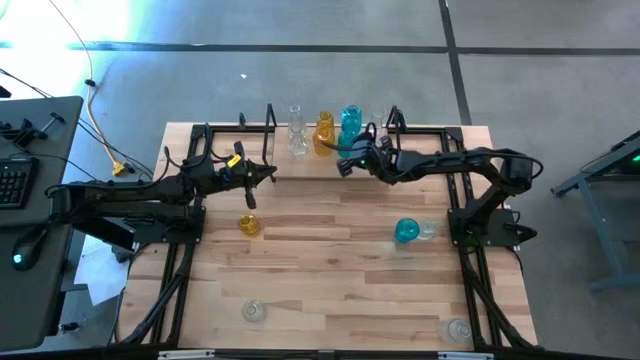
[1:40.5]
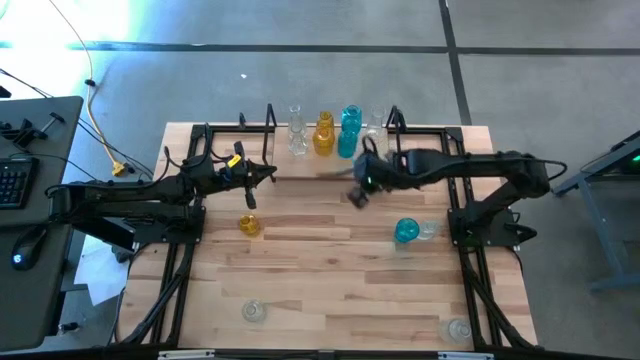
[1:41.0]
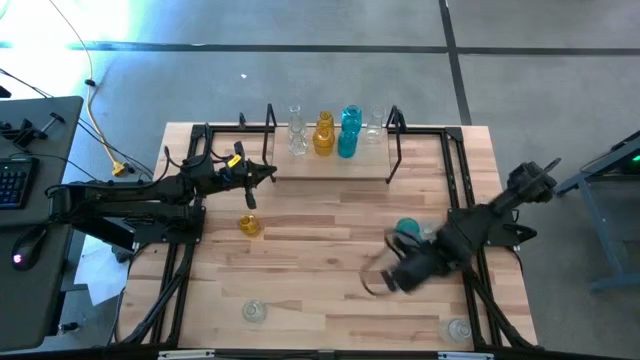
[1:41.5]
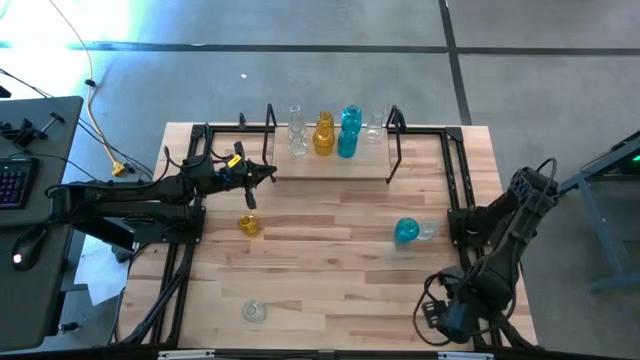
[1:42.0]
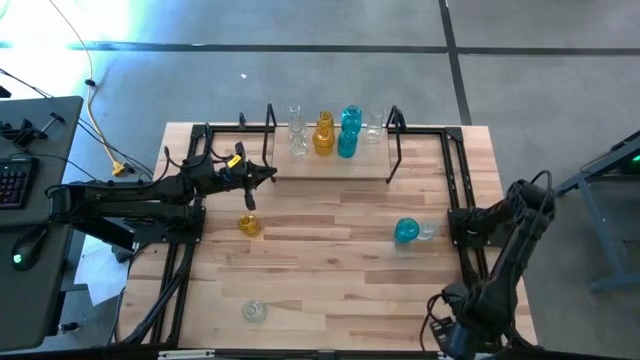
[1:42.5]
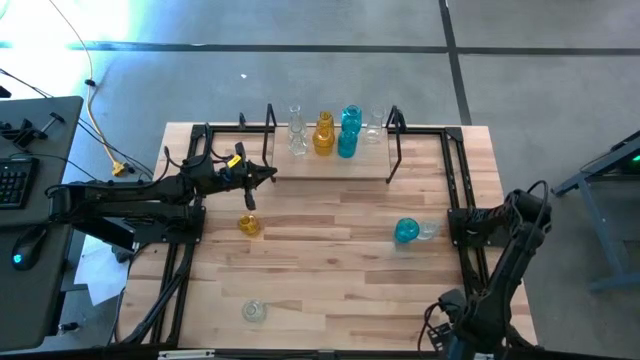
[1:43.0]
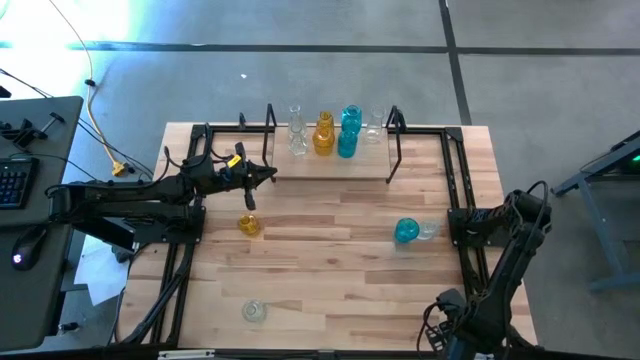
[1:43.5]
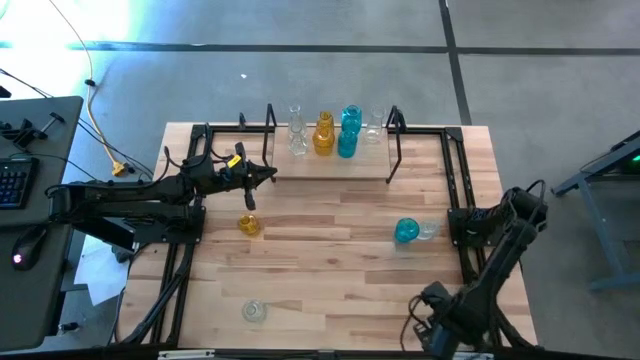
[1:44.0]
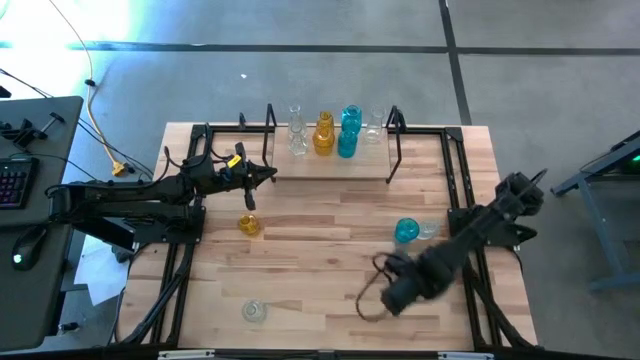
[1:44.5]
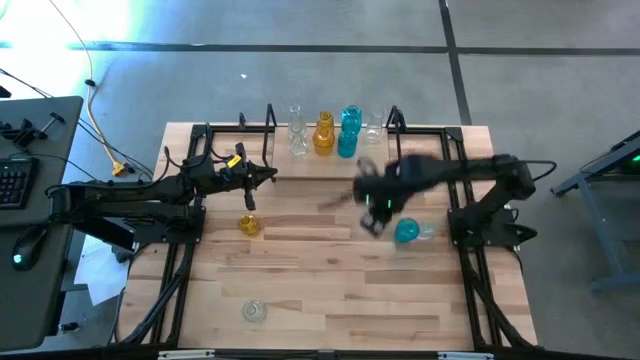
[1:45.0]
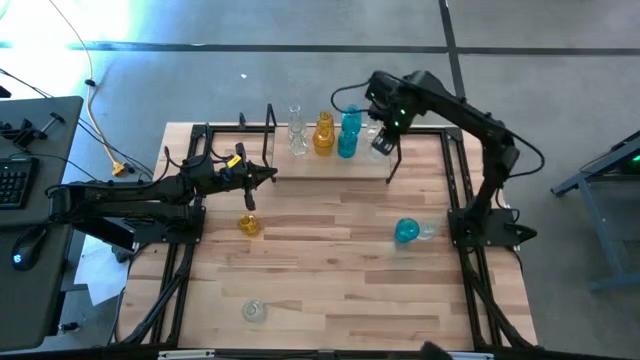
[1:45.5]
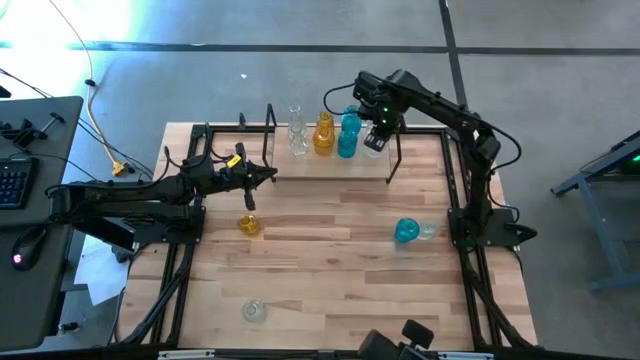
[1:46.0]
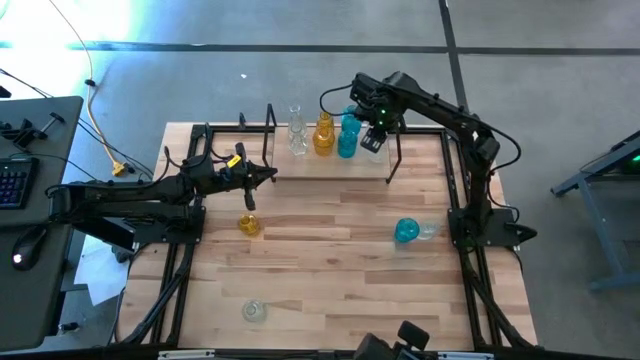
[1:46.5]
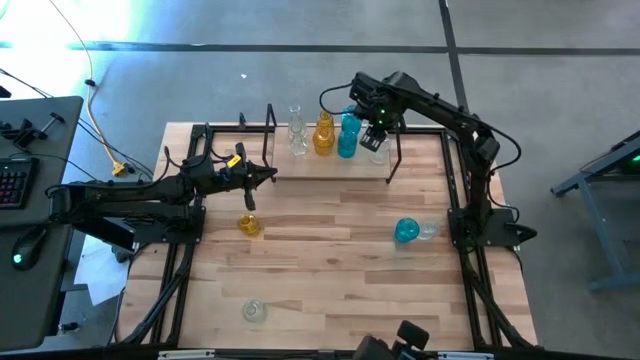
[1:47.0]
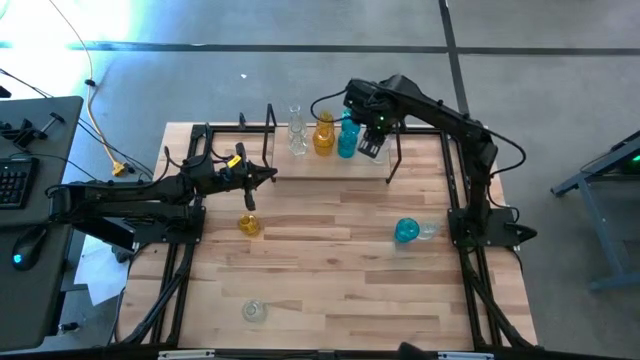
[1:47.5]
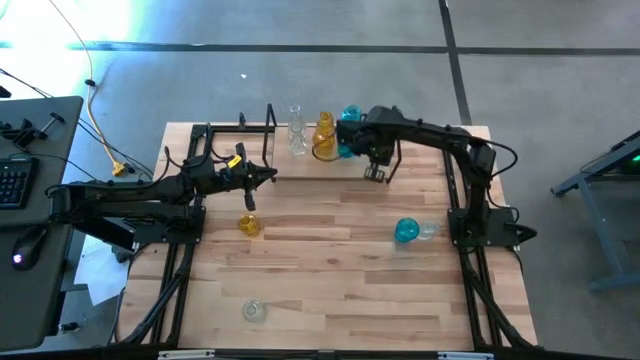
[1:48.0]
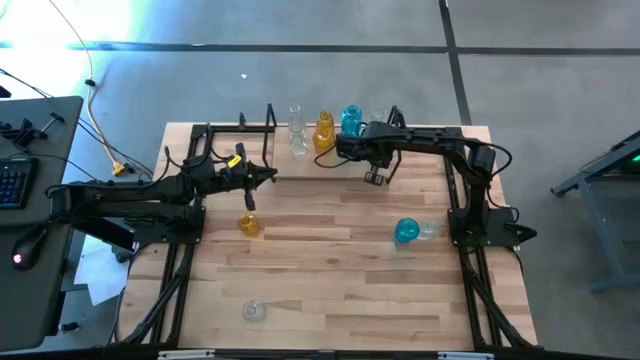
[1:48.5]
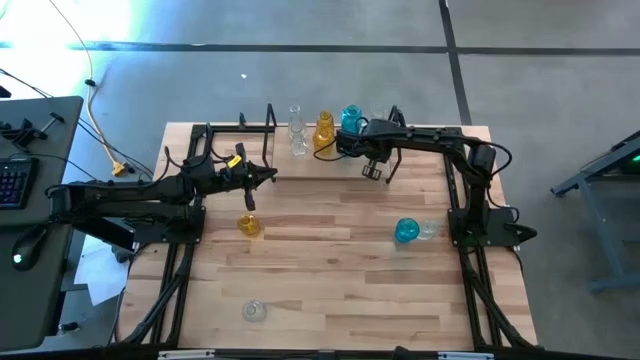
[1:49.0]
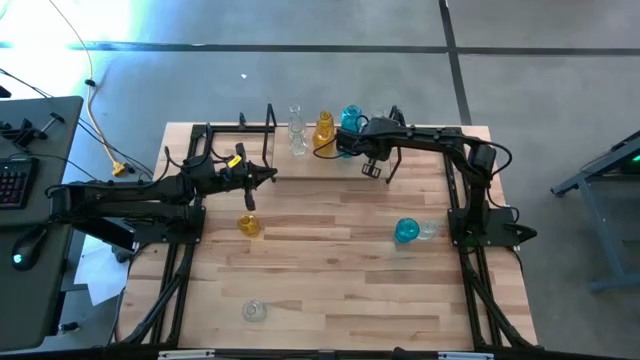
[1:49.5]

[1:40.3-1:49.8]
Task: sort vases onto shelf
Put the transparent vase on the shelf aligned with the other transparent vase

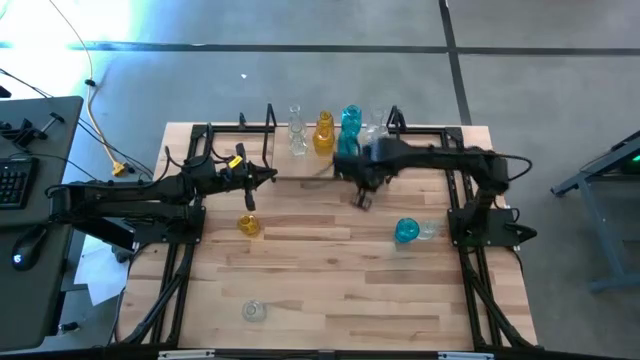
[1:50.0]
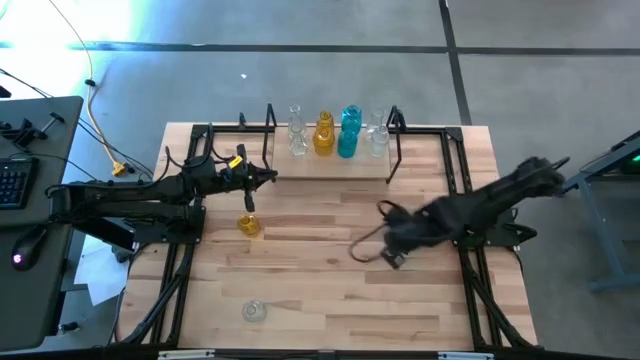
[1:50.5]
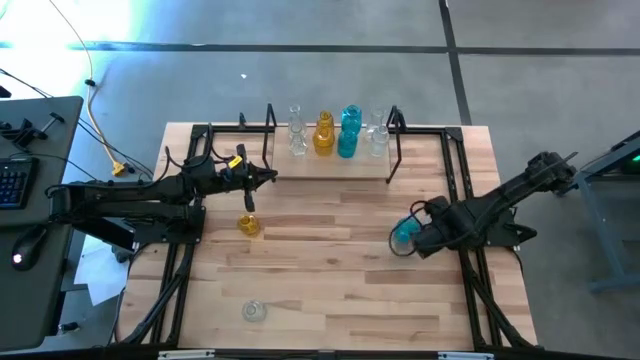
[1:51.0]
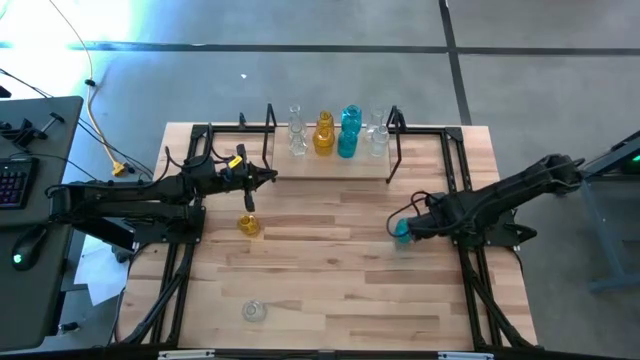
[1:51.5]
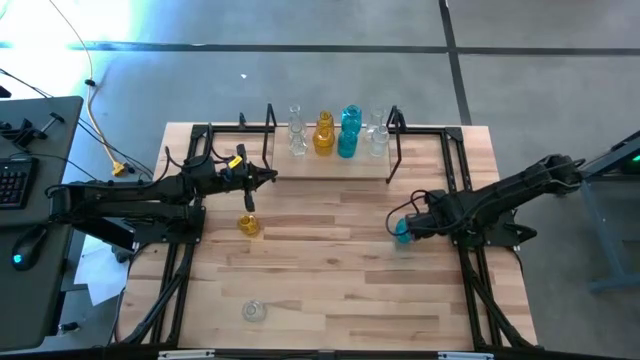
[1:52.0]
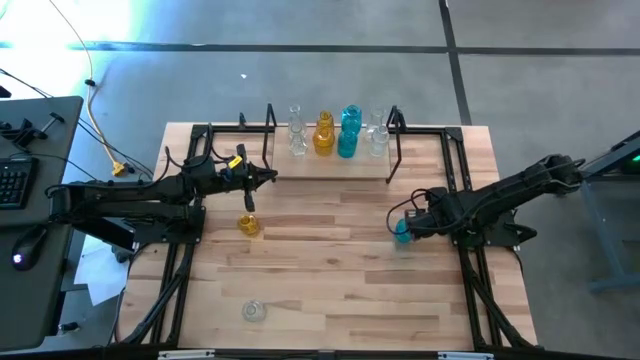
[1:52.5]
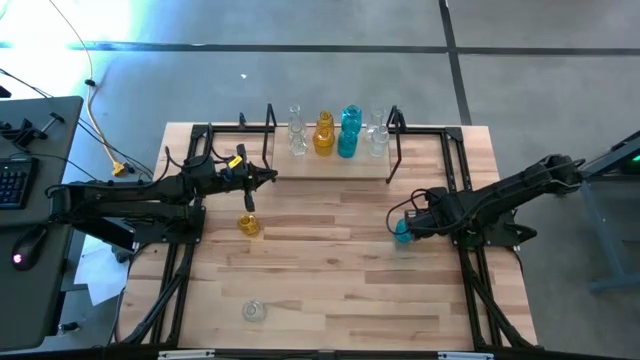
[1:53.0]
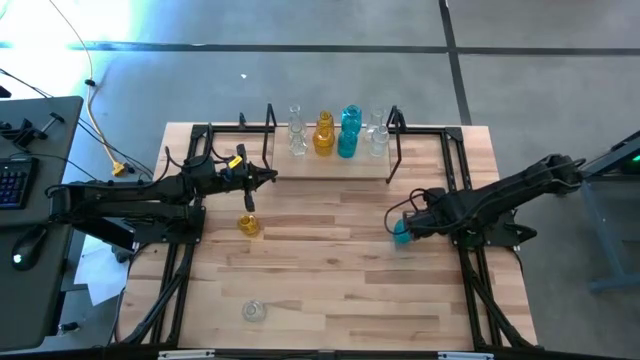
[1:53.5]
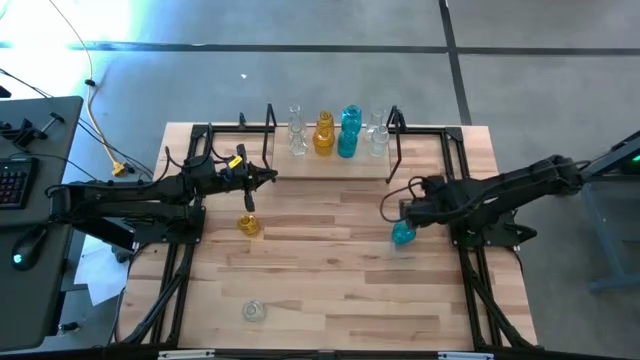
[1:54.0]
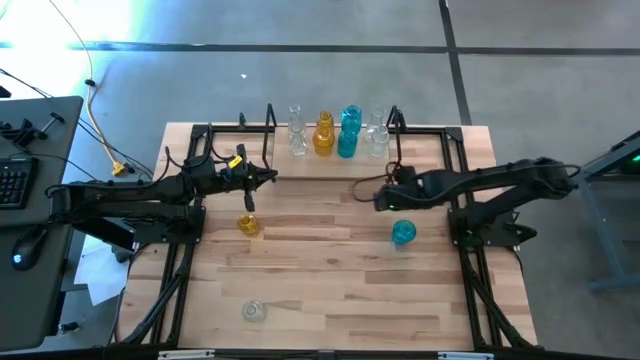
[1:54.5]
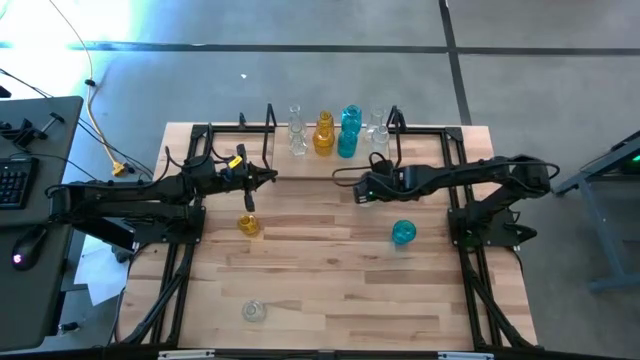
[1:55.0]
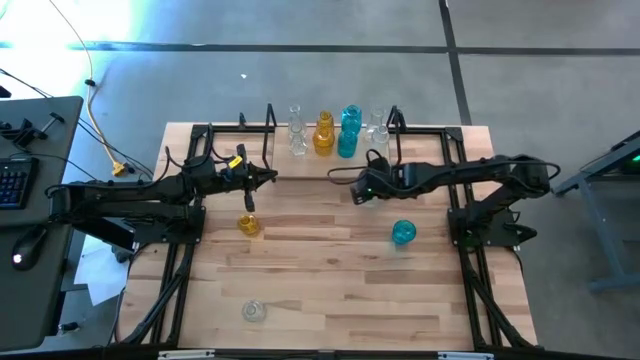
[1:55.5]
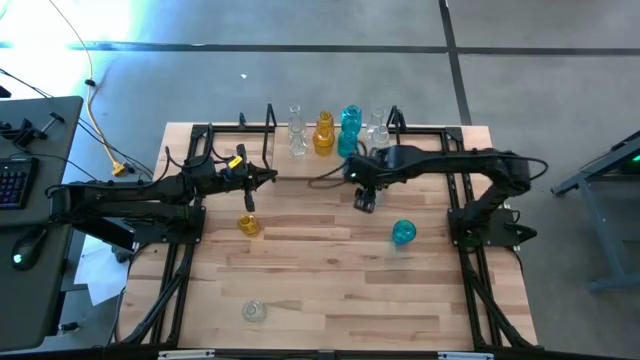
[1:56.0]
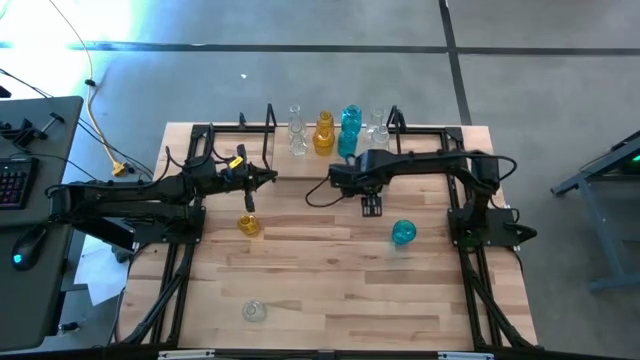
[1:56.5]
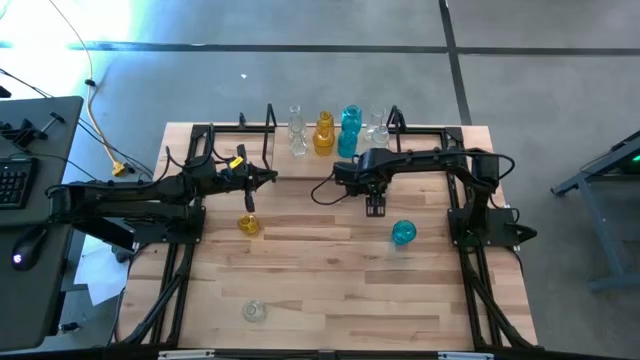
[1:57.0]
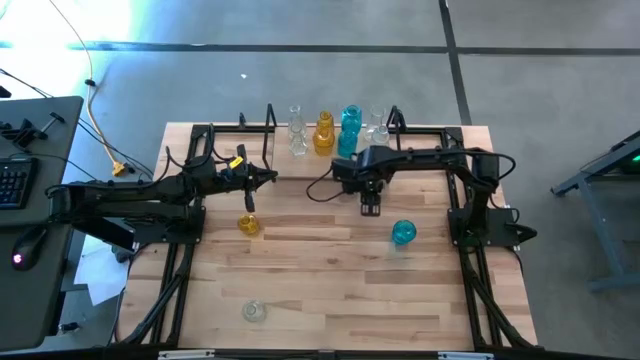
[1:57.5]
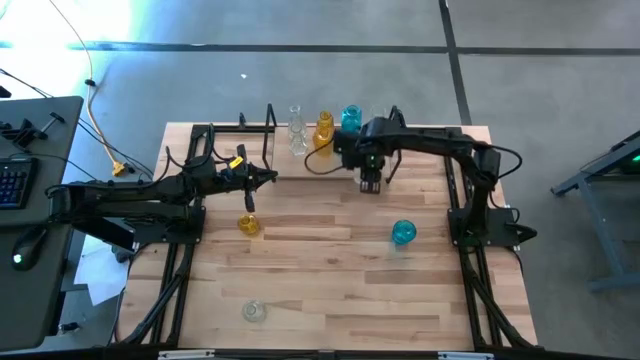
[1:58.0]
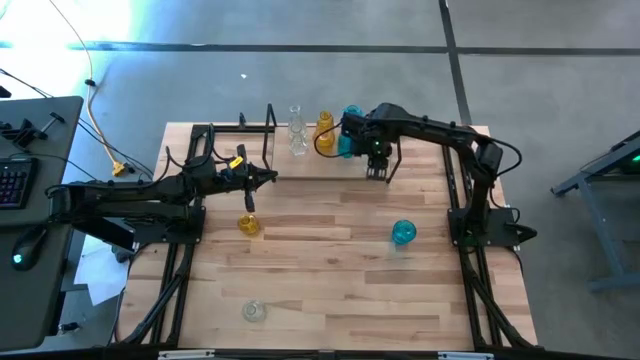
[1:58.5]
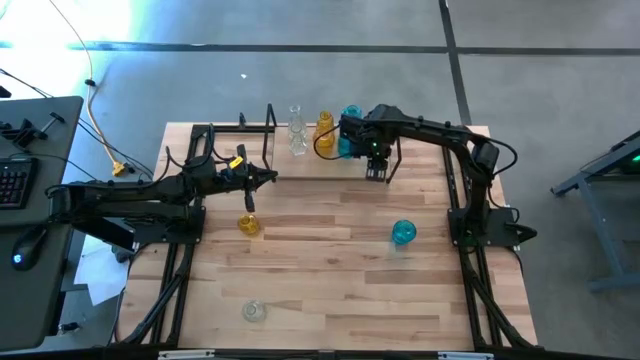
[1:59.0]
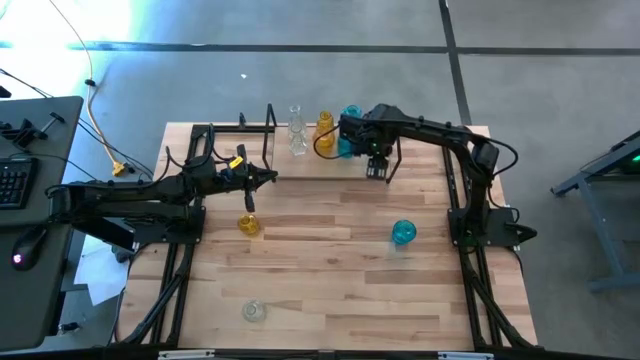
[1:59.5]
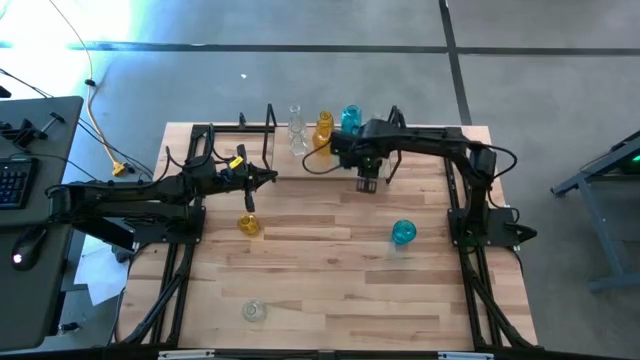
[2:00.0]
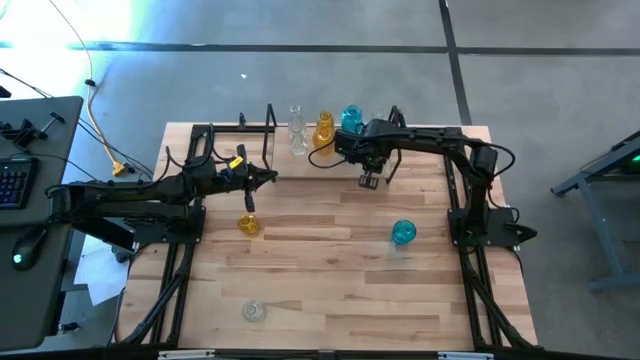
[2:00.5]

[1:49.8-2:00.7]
Put the transparent vase on the shelf aligned with the other transparent vase

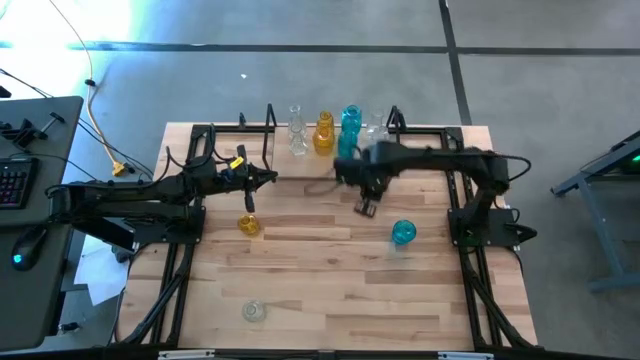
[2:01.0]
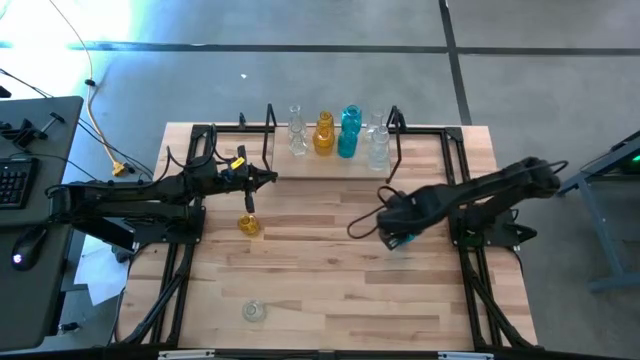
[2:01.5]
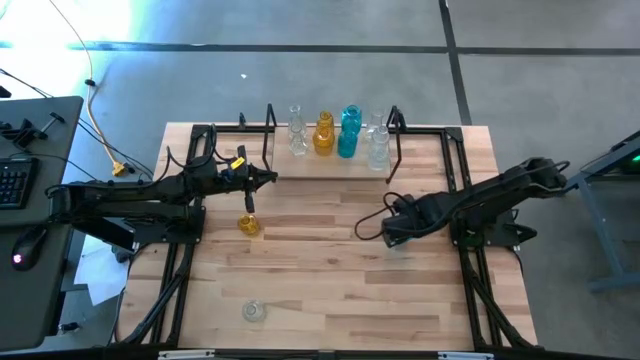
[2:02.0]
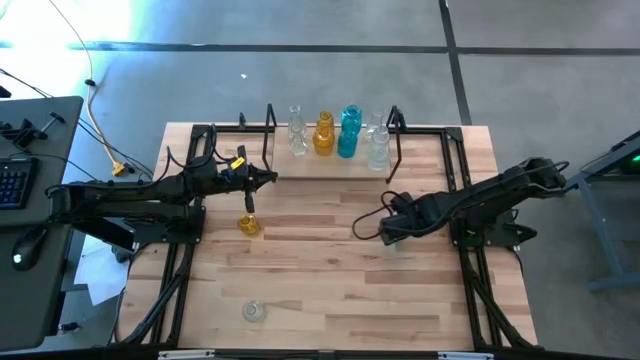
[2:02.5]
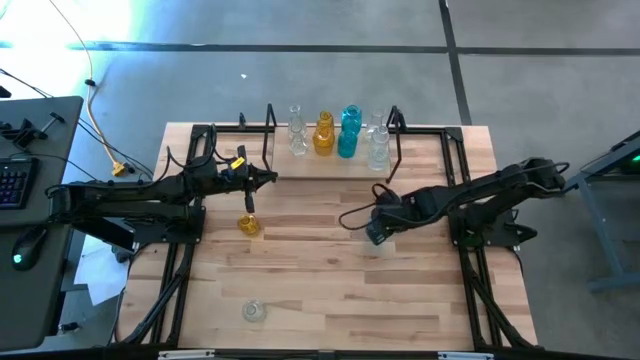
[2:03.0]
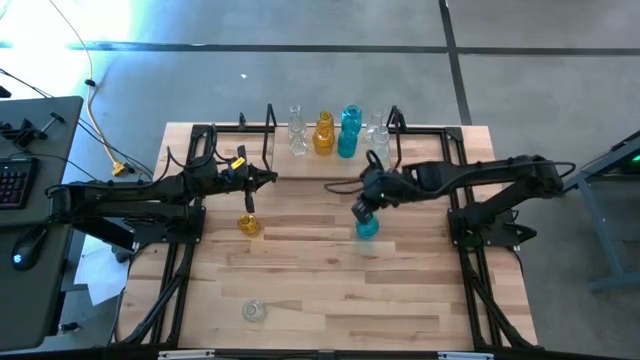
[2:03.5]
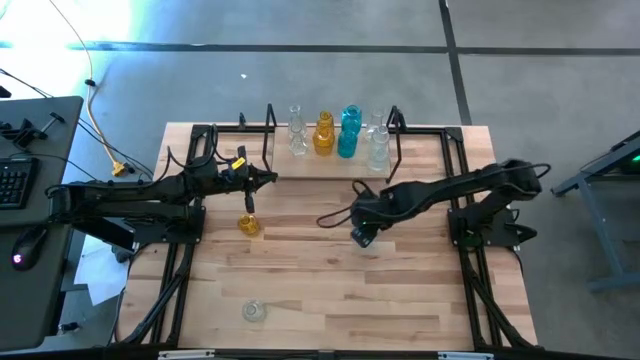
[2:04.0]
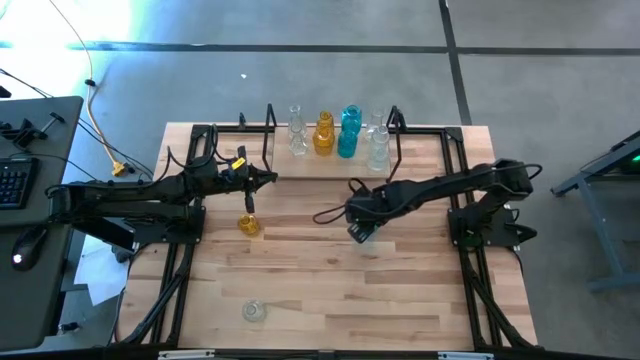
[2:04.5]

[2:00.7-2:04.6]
Put the blue vase on the shelf aligned with the other blue vase
